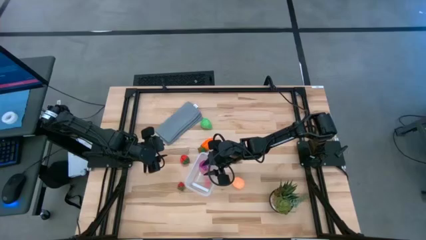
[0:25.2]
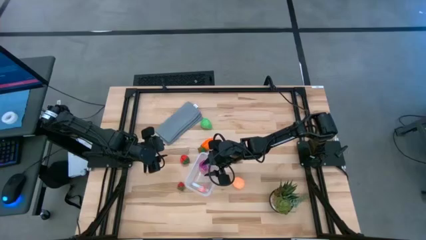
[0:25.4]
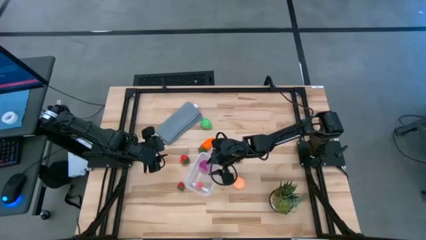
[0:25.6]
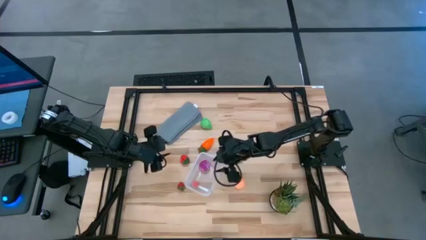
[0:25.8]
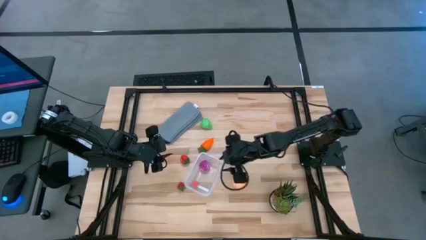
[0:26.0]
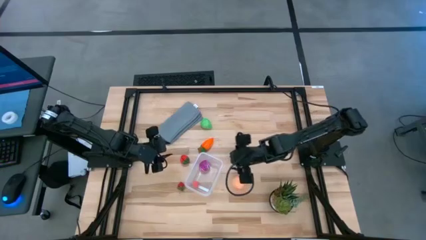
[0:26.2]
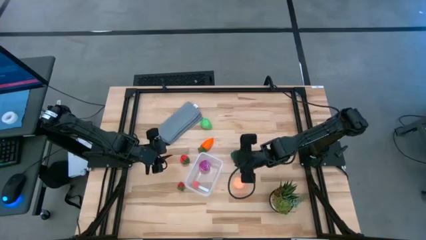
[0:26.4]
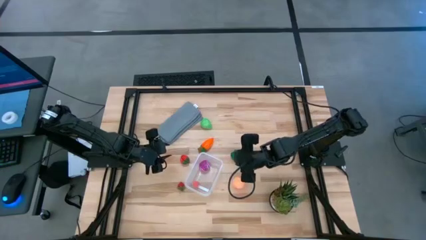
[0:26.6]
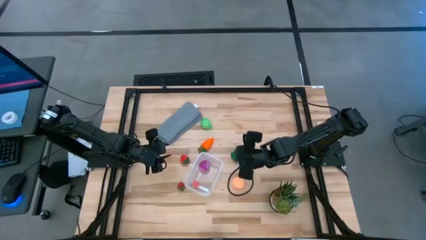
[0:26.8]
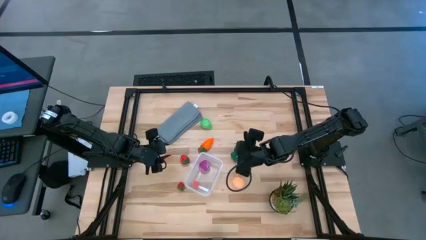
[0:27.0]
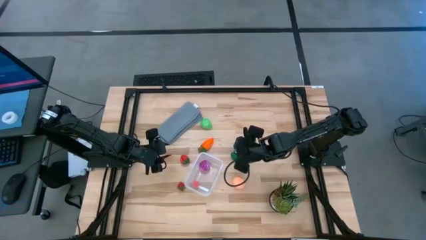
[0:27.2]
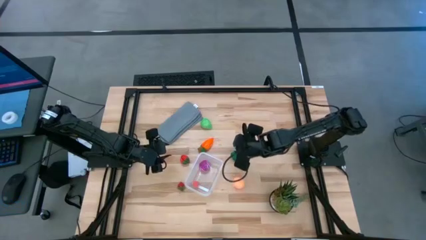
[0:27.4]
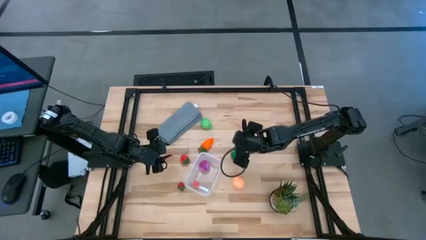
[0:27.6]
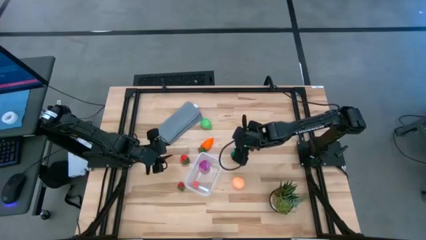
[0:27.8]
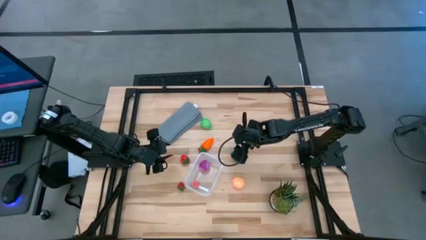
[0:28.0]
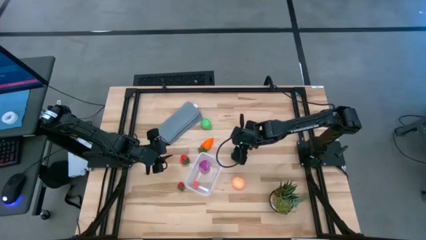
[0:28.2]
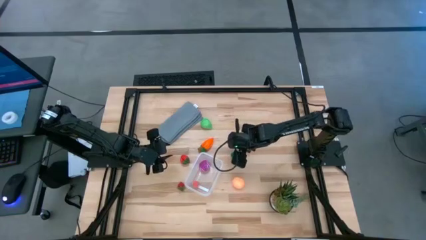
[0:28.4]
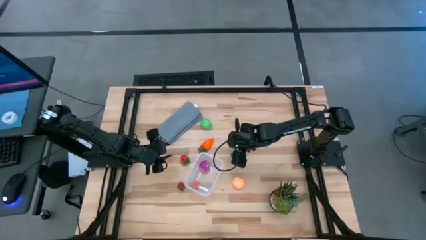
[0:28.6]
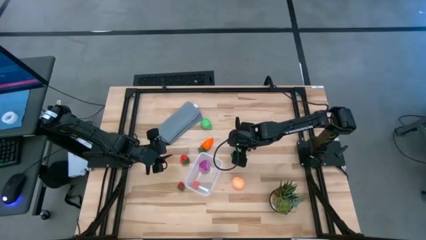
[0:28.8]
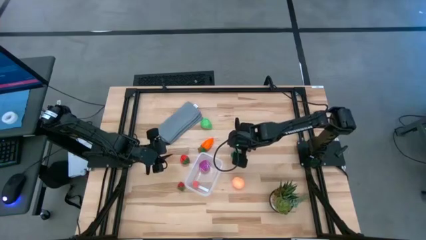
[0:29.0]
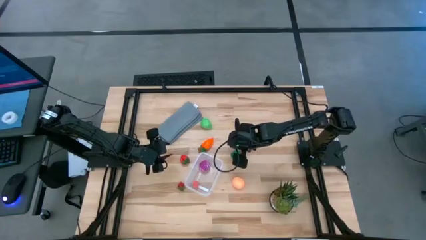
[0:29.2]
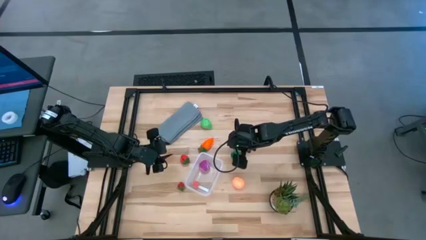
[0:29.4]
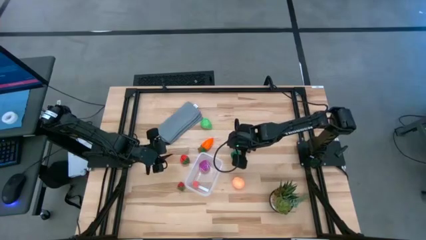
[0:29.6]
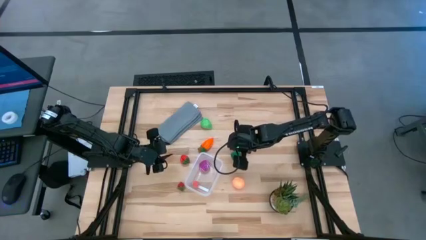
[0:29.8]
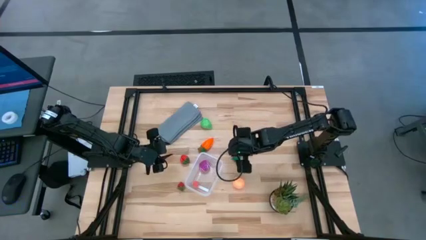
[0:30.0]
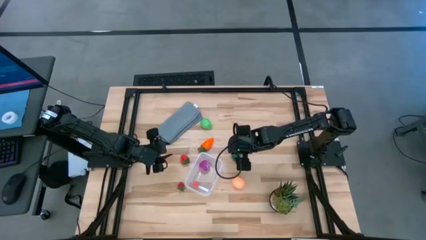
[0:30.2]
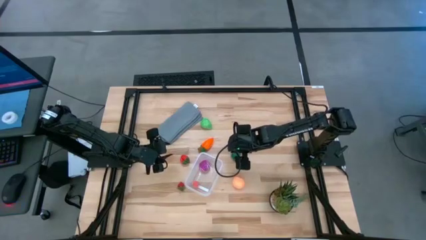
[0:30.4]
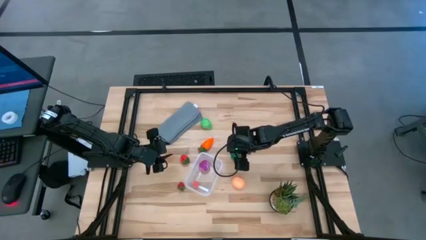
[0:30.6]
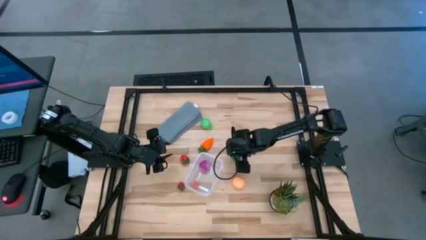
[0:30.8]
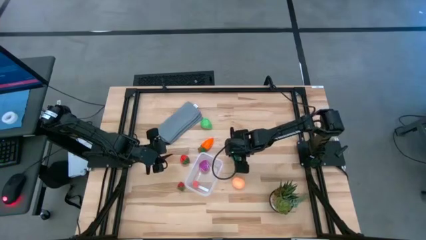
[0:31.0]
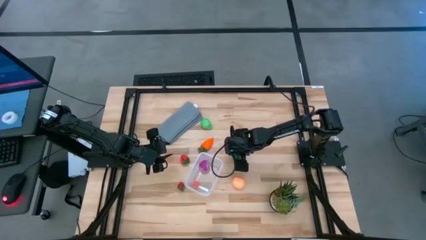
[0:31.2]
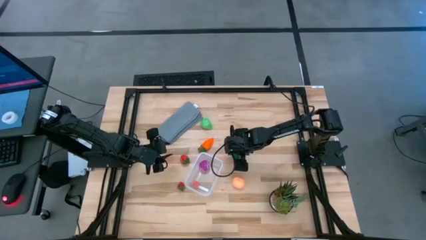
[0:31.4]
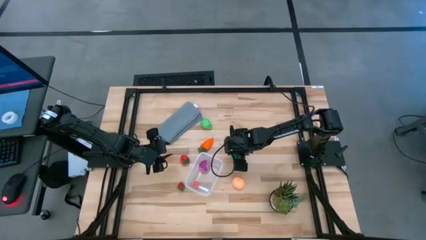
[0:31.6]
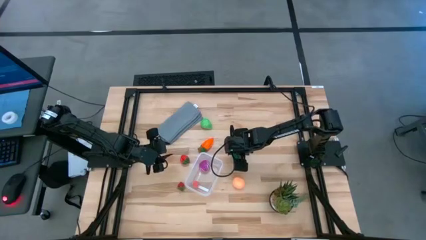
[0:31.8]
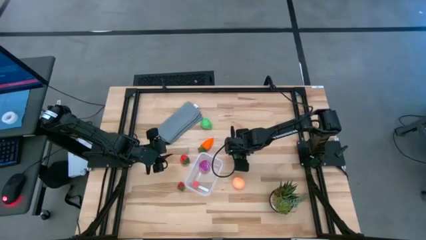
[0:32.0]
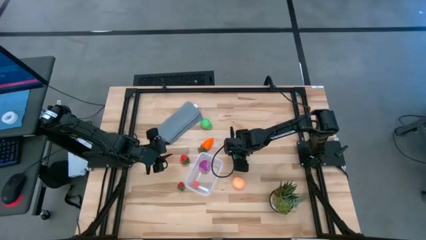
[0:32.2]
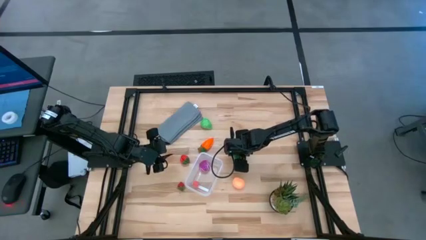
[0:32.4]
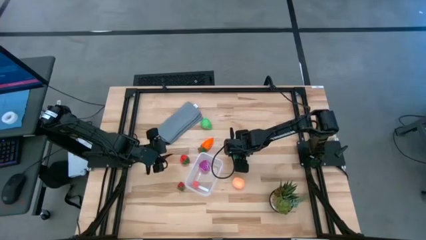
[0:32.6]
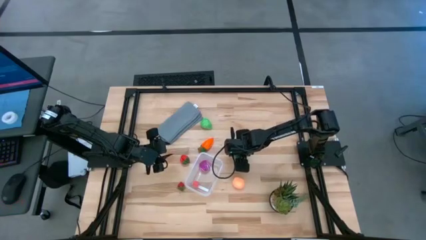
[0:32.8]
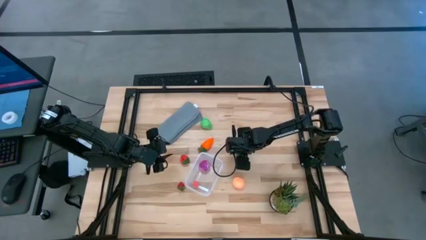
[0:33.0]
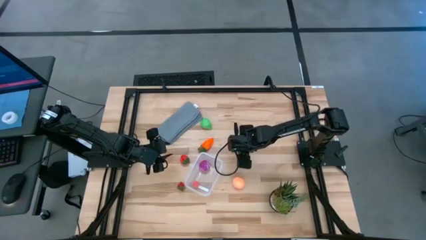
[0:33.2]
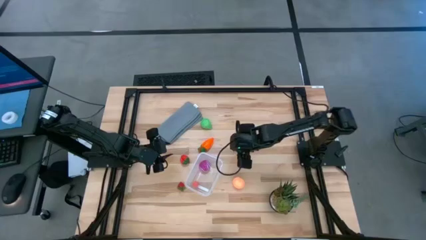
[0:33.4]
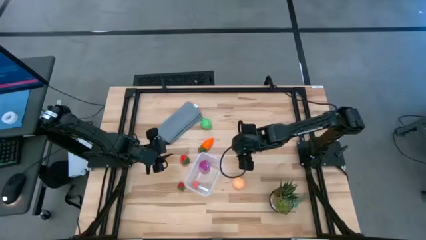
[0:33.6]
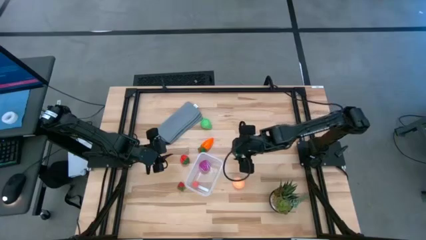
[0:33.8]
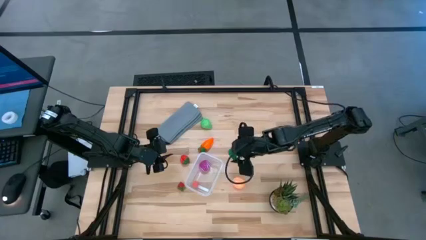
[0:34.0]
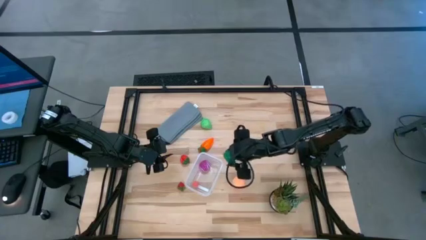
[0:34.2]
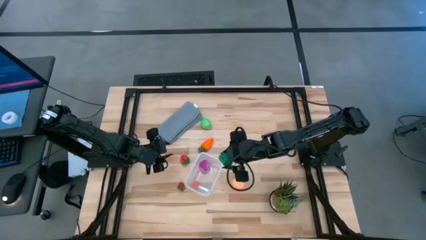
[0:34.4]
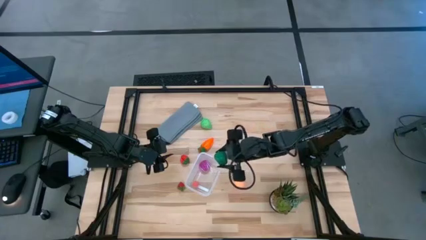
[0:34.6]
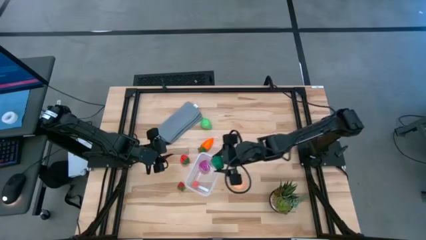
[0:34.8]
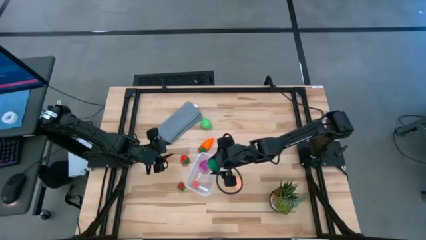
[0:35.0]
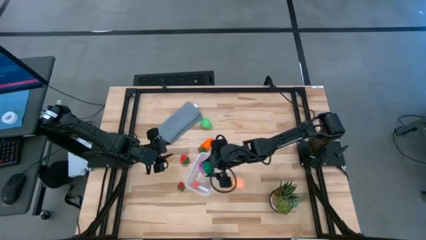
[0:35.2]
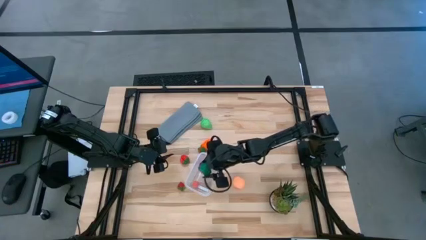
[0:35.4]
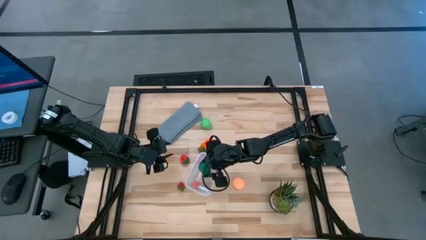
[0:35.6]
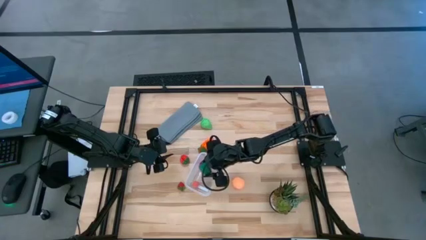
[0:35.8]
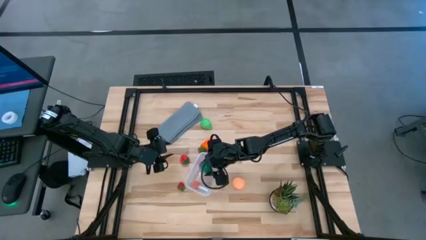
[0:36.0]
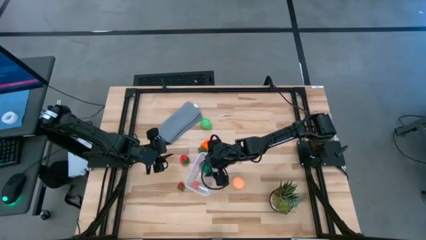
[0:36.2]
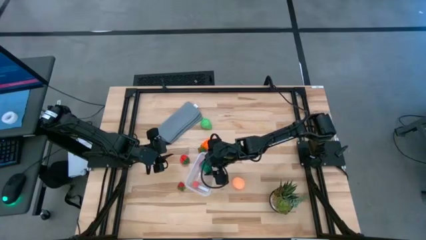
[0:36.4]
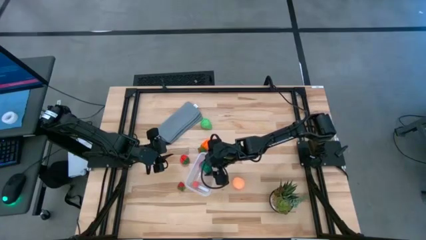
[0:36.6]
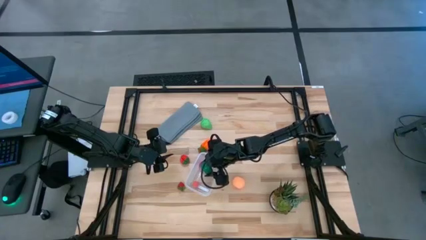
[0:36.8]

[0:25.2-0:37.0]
Task: Pick and placing Produce into tupperware
Put the green bell pepper into the transparent bin

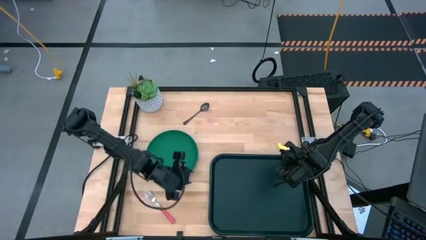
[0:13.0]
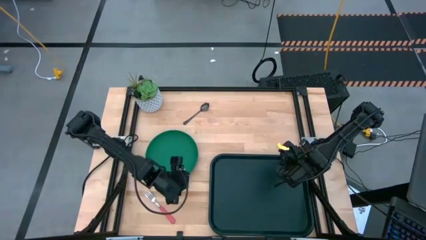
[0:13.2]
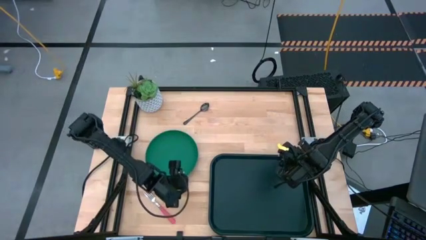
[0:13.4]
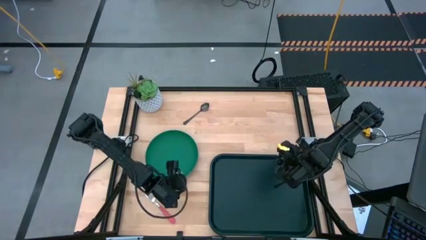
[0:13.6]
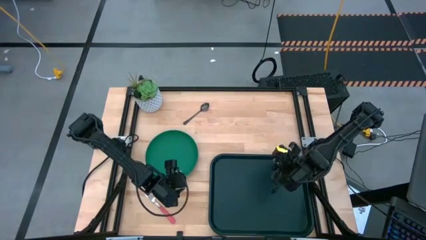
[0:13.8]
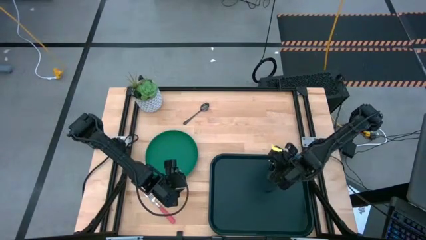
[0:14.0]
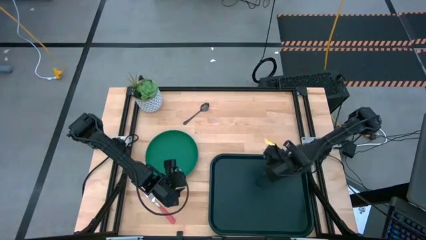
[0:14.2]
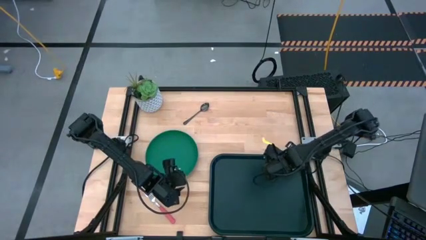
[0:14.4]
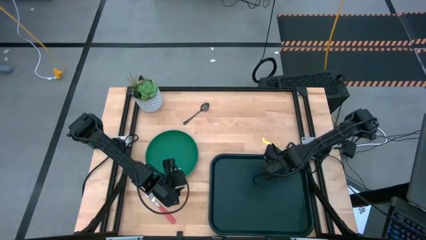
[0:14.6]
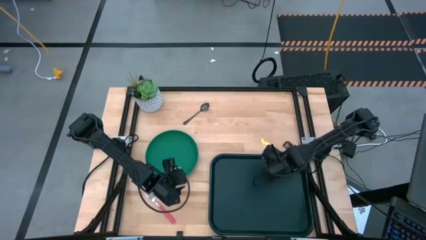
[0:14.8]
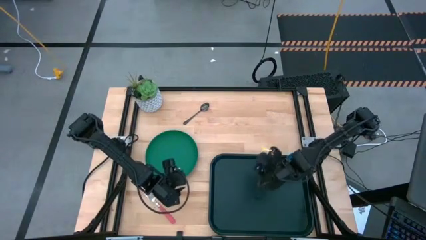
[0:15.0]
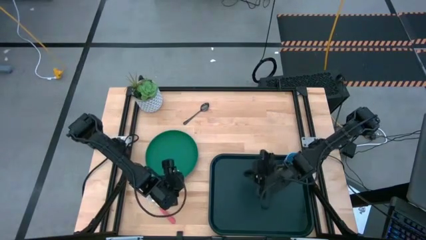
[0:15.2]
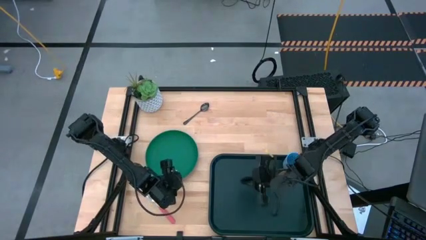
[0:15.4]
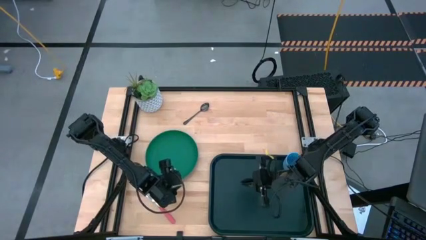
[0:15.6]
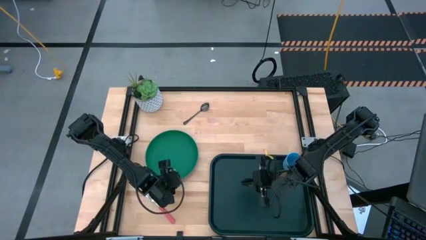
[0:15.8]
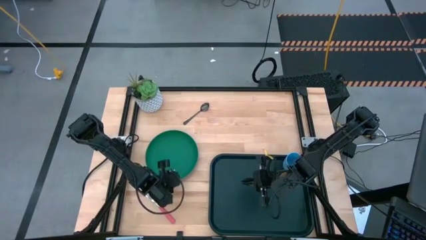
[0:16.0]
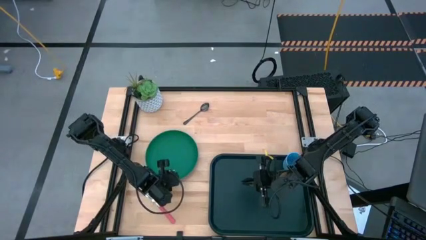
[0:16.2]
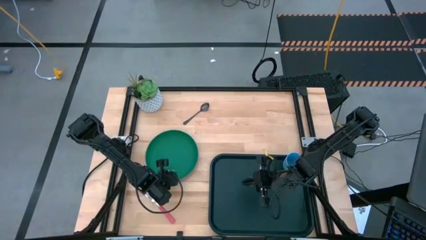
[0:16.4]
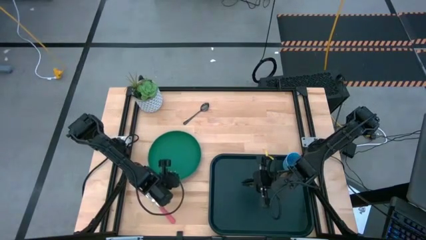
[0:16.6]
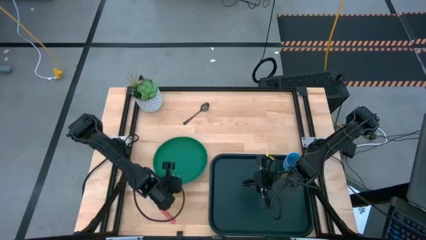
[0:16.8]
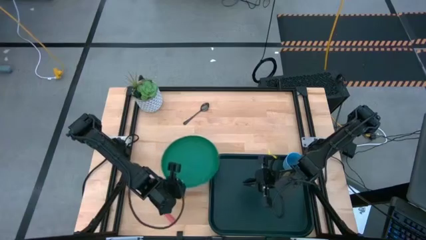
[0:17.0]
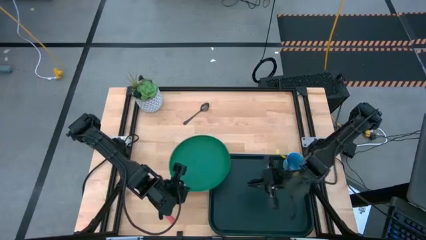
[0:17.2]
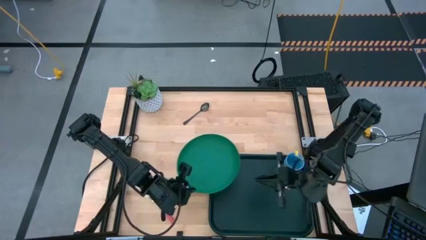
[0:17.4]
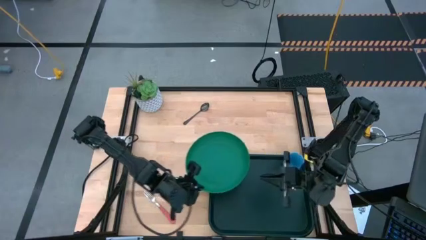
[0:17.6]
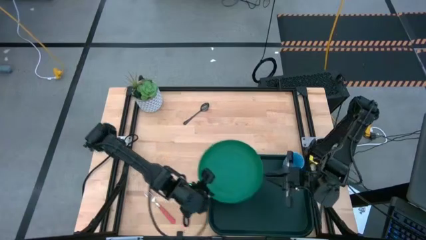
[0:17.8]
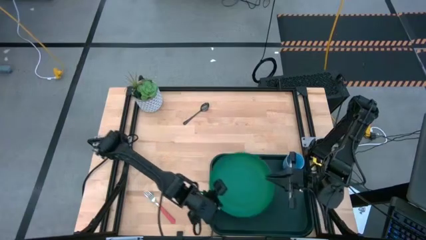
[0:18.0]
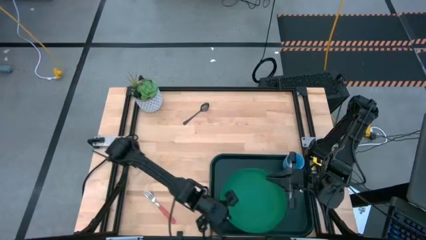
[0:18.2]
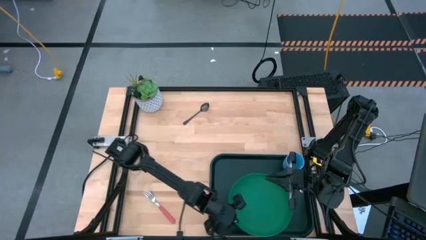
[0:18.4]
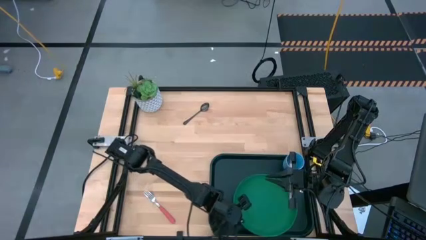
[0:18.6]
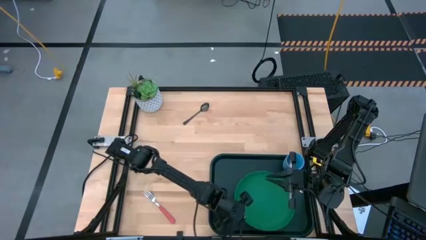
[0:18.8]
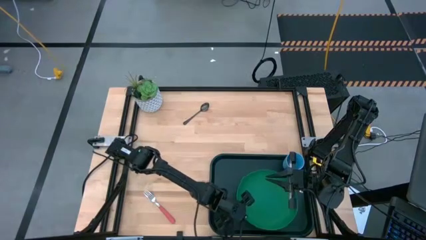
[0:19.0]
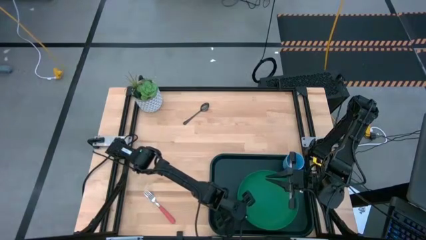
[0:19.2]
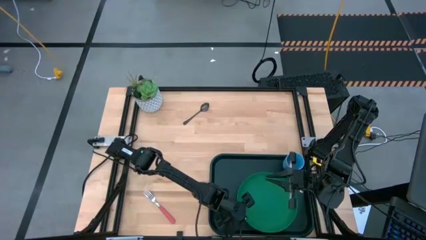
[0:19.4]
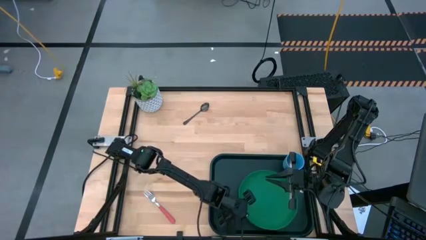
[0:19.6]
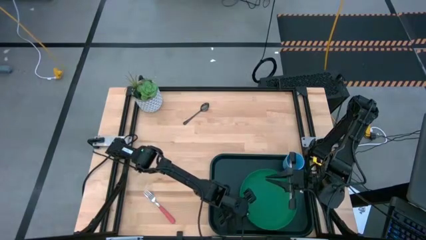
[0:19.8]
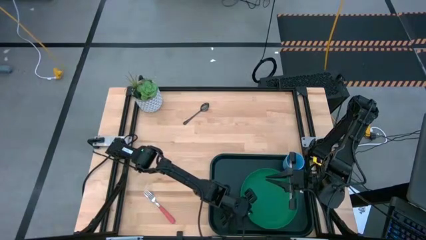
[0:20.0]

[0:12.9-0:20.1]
Task: Pick and place plate/cup/fork/spoon on tray
Put the green plate on the black serving tray
